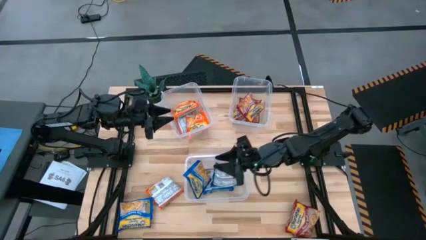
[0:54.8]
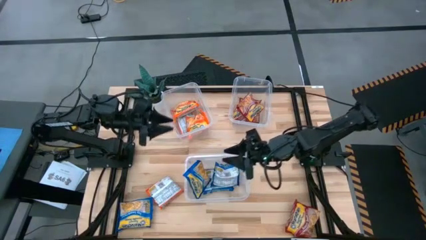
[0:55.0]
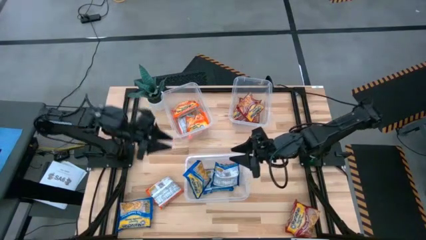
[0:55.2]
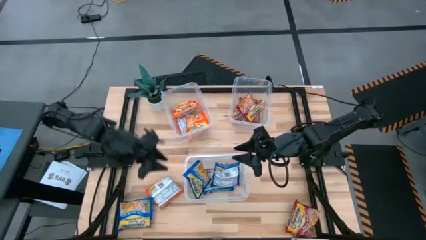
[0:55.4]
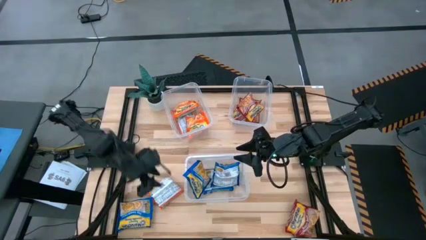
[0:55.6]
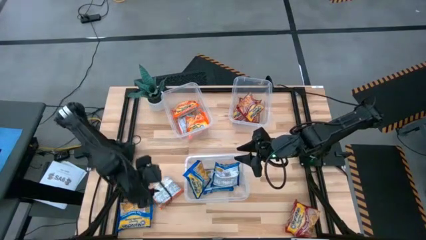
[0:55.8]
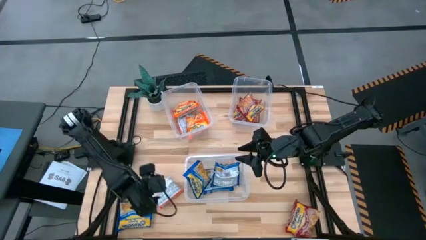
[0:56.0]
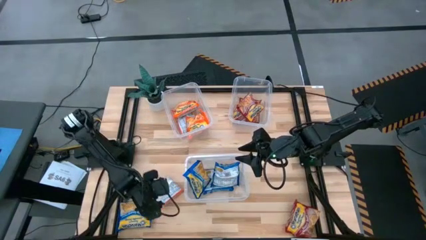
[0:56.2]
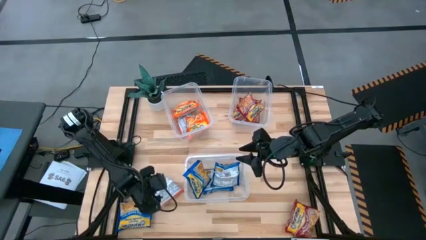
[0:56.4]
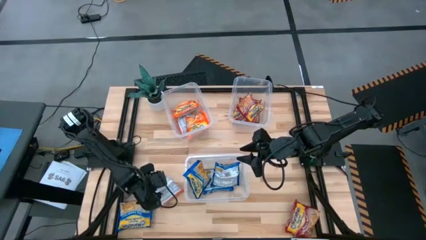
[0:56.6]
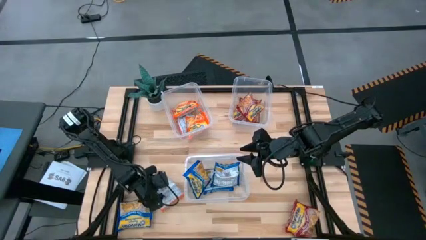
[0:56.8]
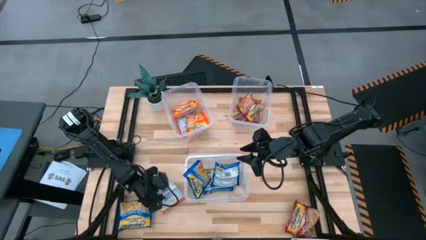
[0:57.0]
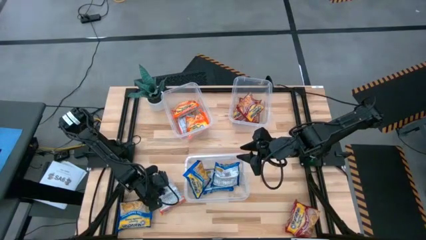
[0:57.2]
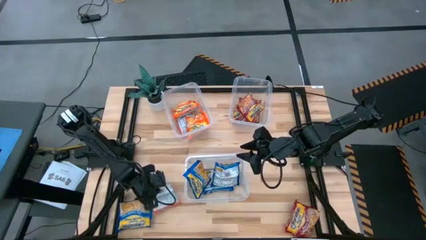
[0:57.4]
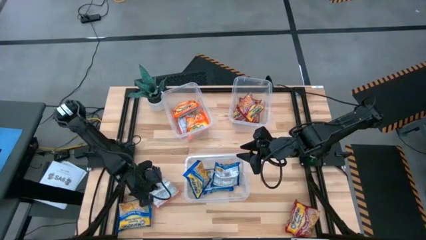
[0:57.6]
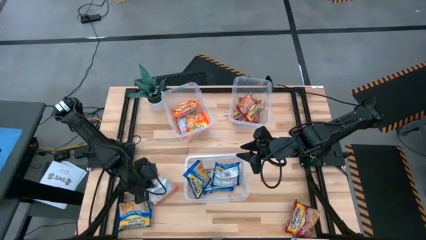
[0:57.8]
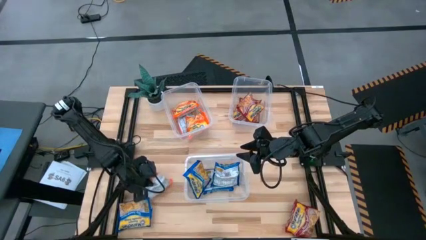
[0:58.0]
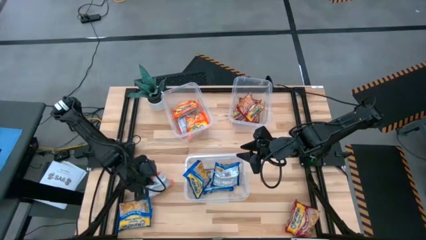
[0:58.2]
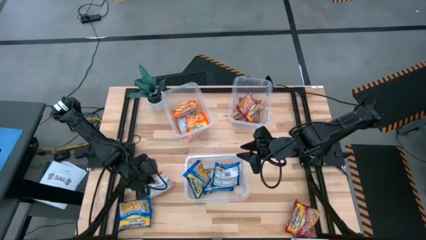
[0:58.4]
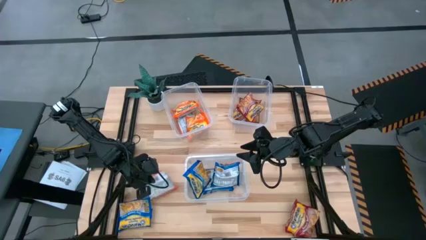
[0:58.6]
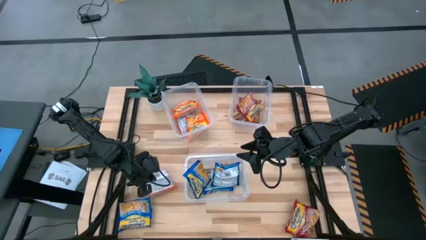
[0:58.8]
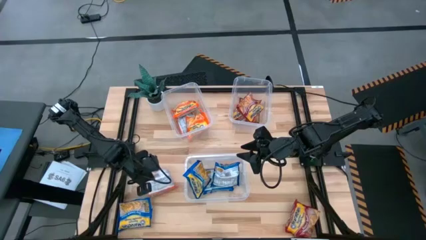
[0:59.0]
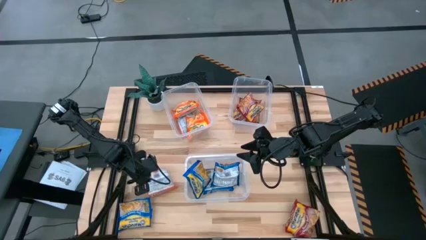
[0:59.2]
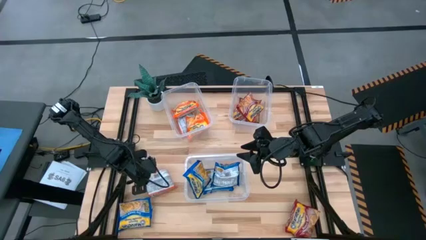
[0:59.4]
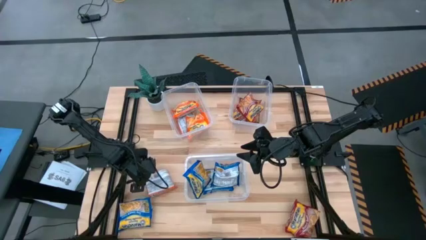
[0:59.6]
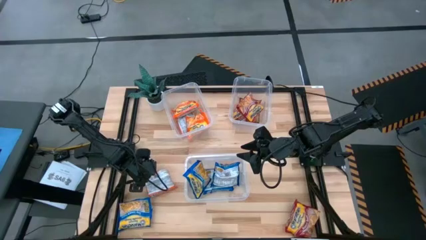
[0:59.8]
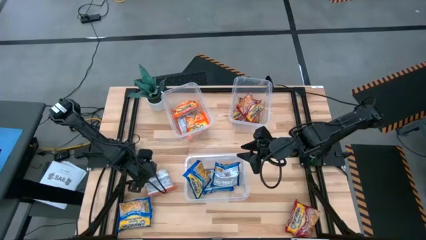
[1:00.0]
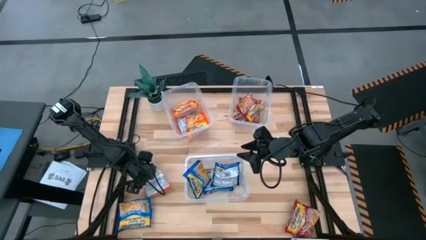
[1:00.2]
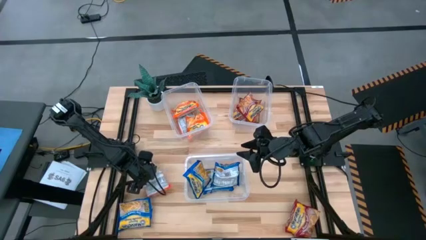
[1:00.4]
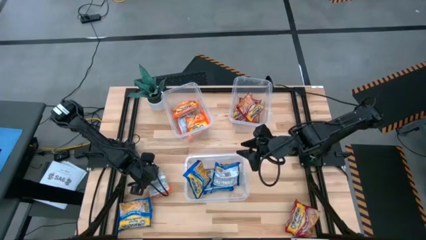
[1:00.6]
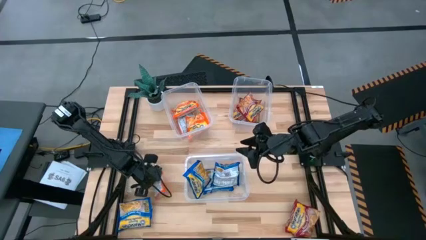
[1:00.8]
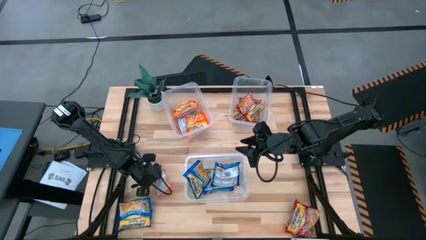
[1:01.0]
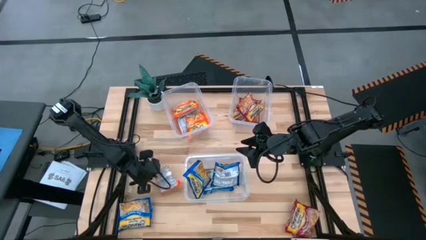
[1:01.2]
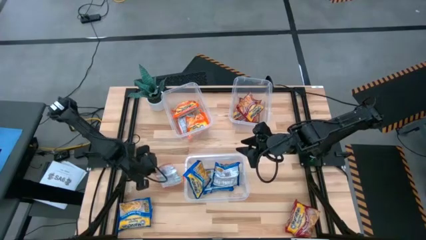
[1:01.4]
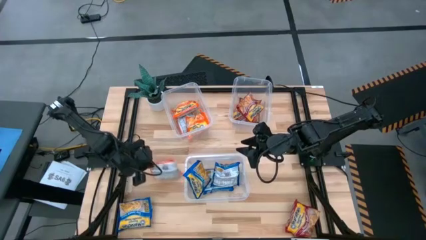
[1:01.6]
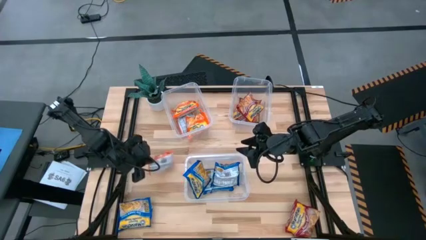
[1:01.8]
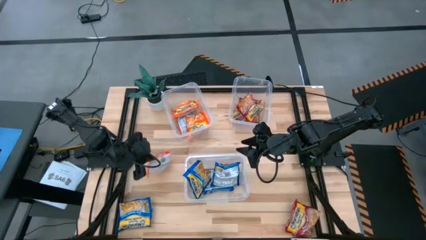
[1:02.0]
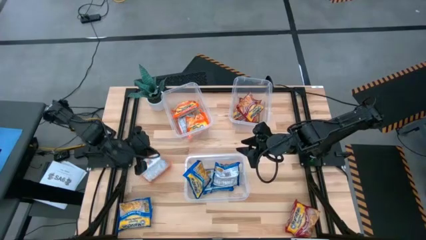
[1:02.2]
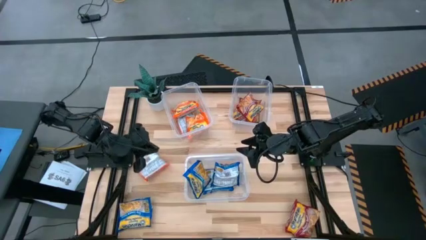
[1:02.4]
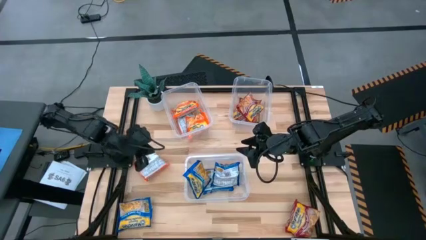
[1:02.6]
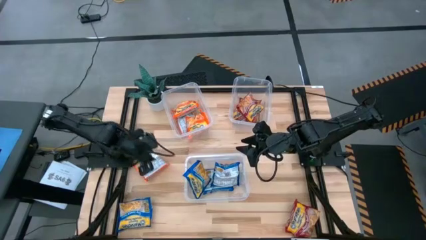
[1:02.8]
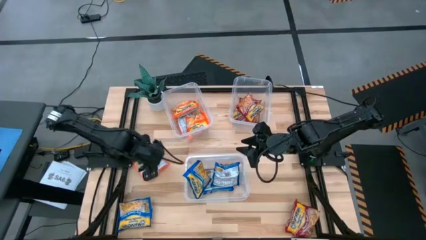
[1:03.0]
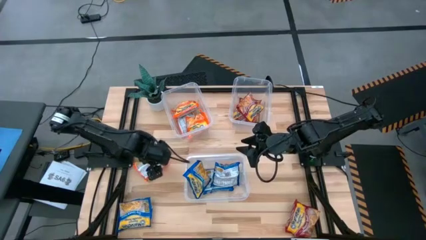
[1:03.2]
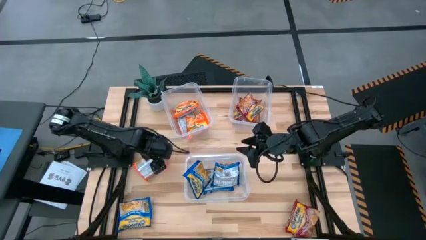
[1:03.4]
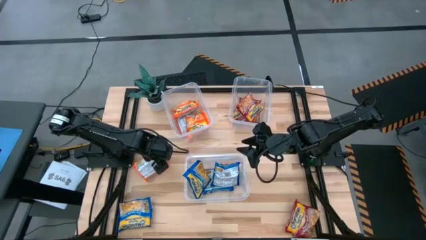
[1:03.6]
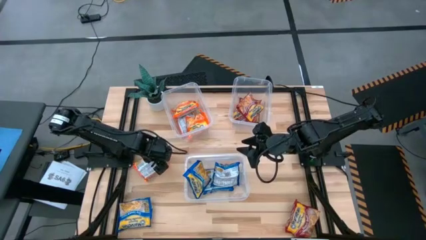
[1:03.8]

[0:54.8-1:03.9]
Task: Sort Maruchan noodles
Put the orange bag into the top left transparent bin

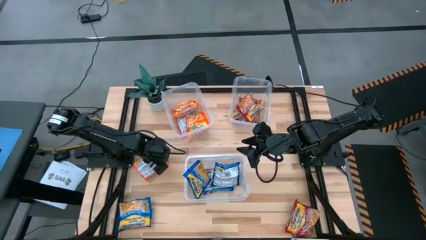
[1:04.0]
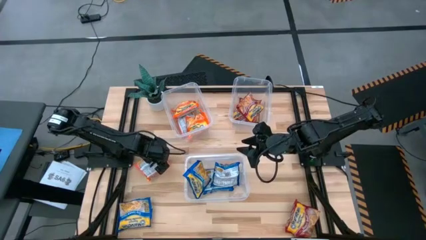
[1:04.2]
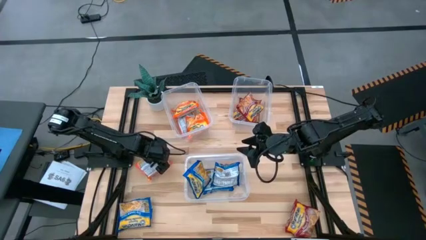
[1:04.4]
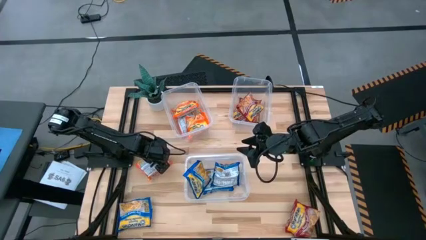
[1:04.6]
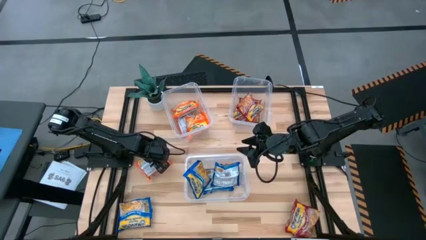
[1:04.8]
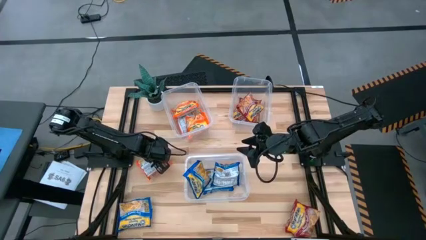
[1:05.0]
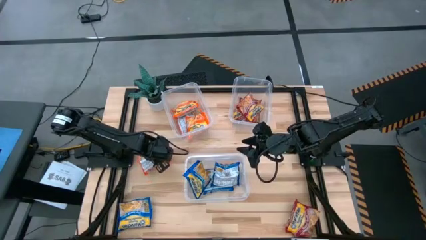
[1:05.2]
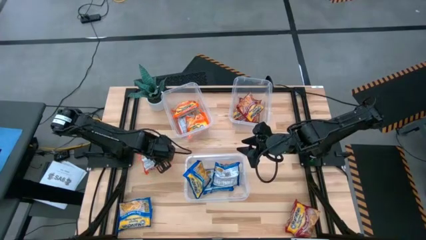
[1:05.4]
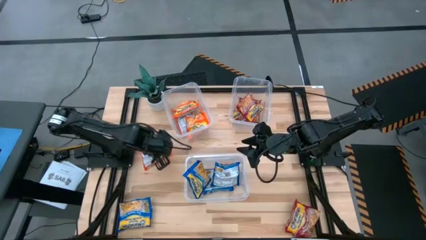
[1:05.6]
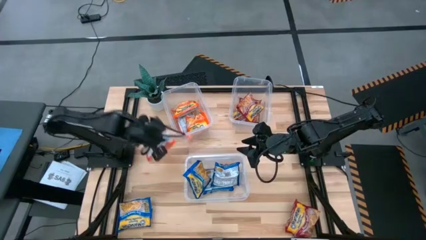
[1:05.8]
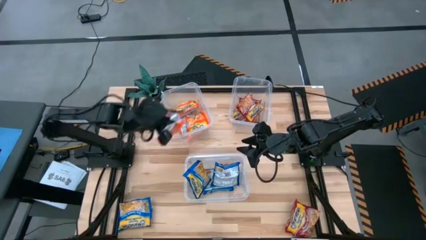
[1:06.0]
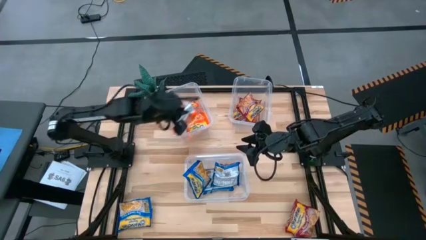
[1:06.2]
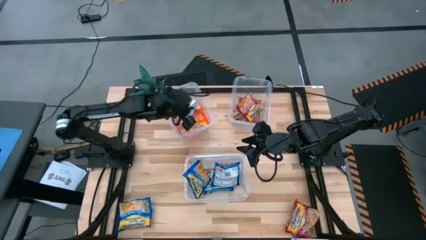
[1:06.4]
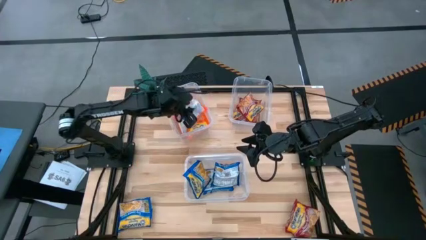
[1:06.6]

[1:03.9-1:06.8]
Put the orange bag into the top left transparent bin

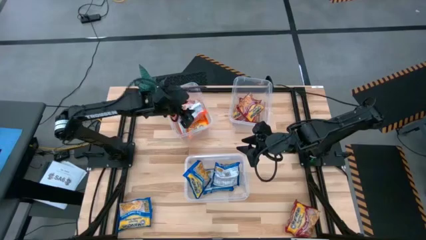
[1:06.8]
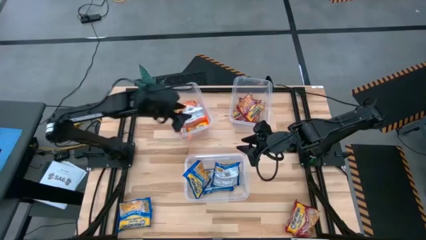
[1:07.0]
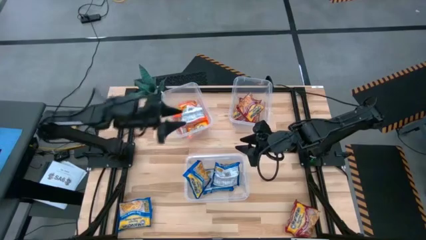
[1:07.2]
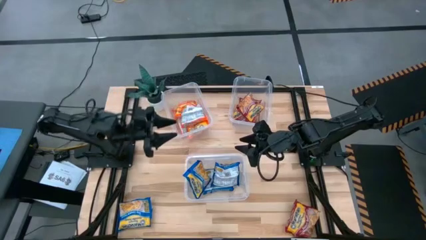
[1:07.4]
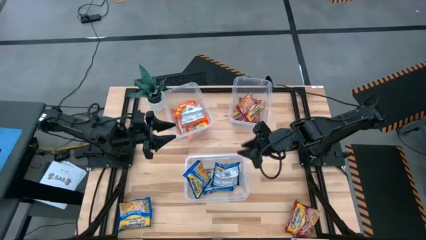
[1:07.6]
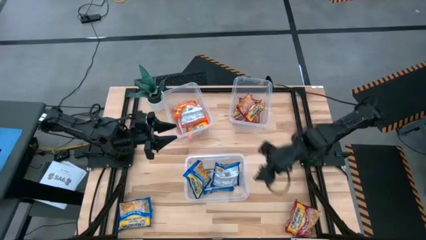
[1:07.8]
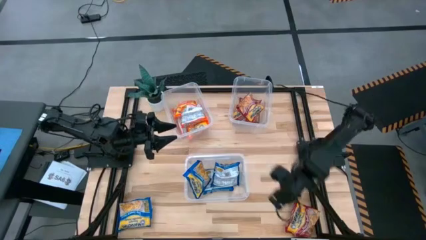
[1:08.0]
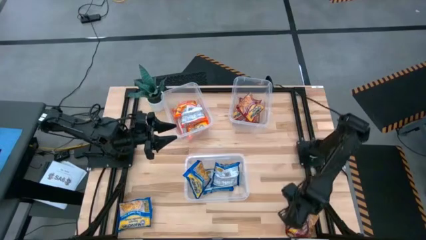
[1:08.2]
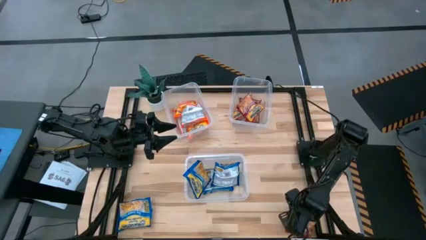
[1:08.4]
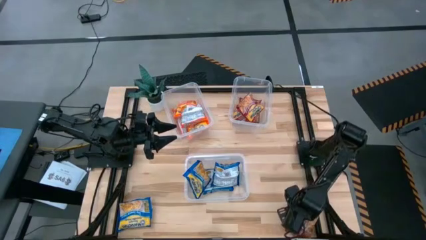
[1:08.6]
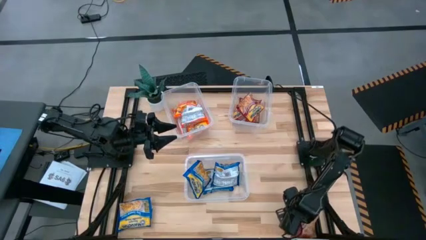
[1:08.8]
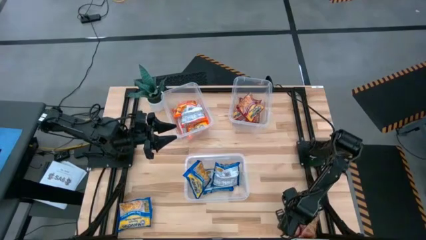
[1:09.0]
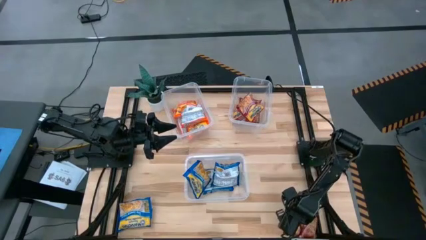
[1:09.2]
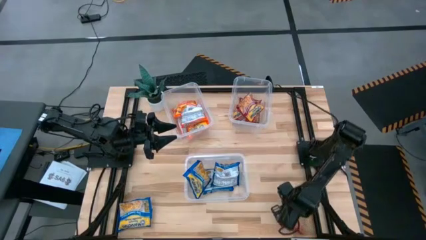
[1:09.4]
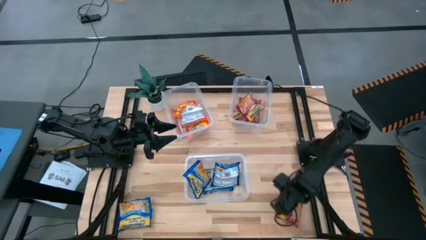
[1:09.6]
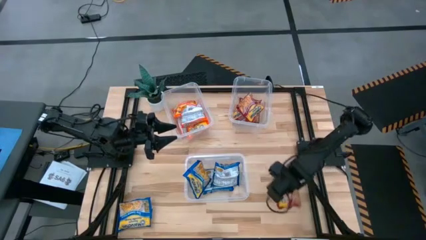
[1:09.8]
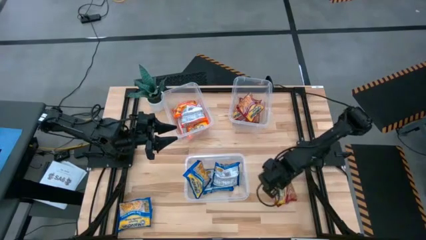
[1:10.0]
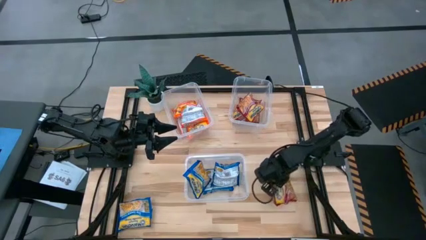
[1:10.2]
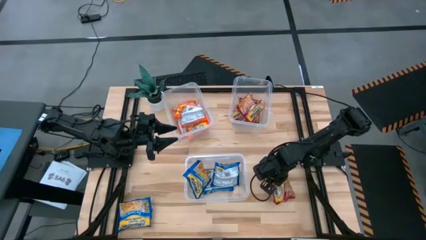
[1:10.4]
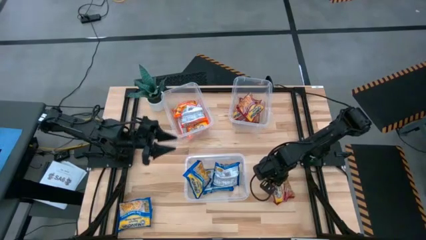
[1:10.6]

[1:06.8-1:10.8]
Move the red bag to the middle right of the table

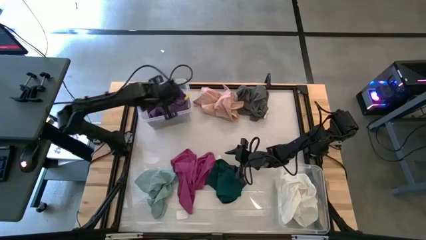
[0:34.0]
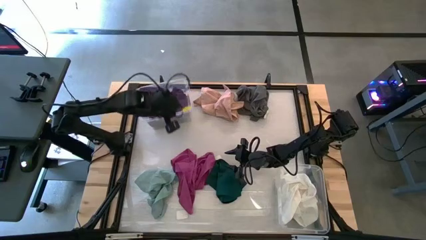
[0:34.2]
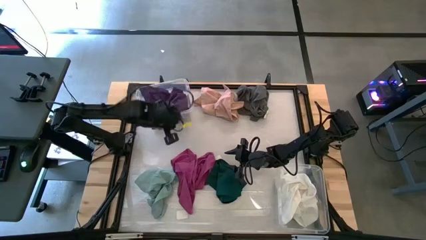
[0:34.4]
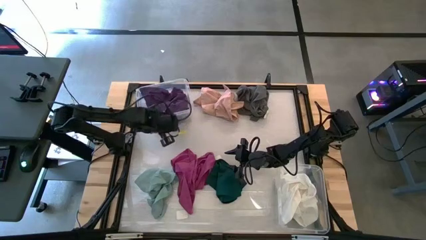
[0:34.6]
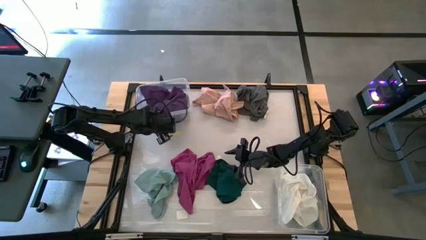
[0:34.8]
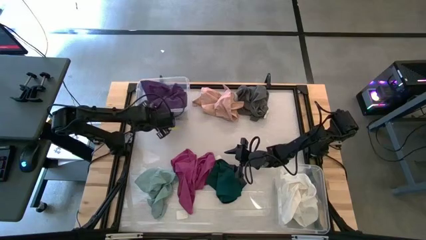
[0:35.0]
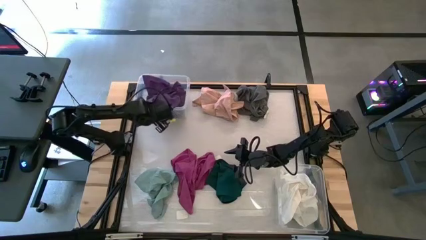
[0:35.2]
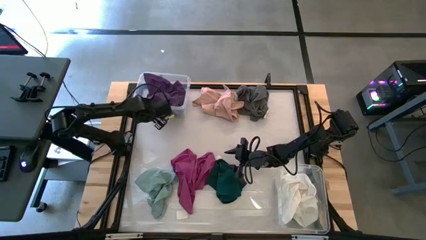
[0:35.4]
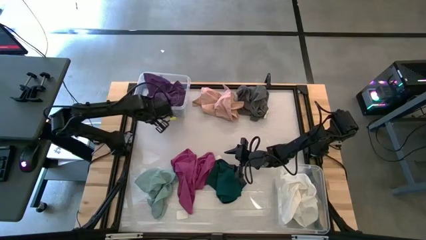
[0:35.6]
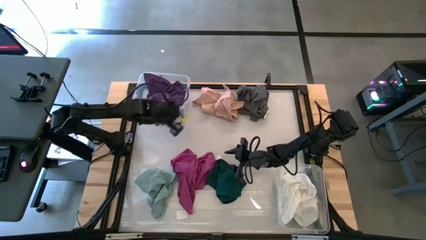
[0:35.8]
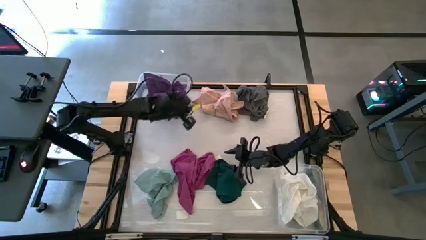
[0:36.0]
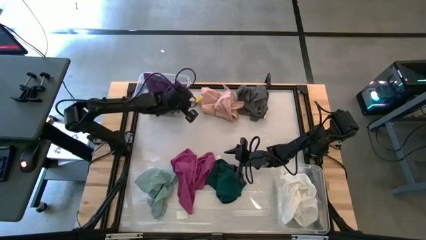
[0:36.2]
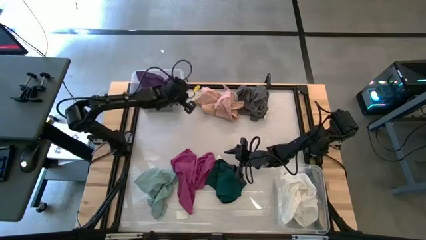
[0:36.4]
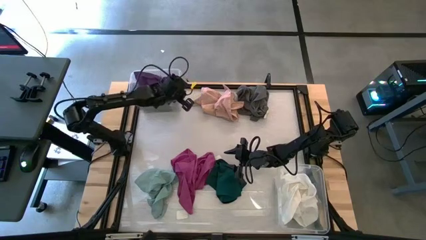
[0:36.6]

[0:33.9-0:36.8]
Task: Sort microfiber towel by color & place in baskets
Adjust the top transparent bin
